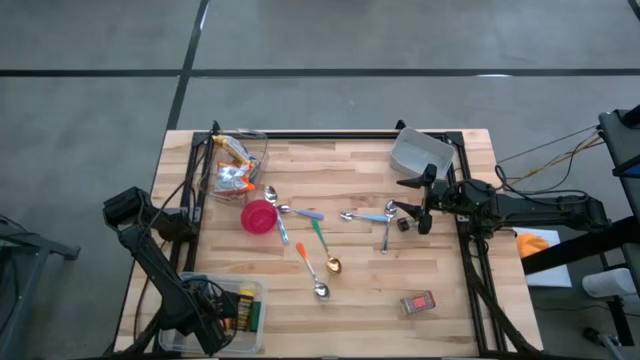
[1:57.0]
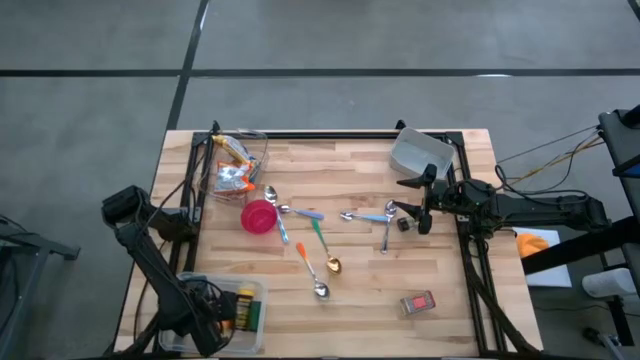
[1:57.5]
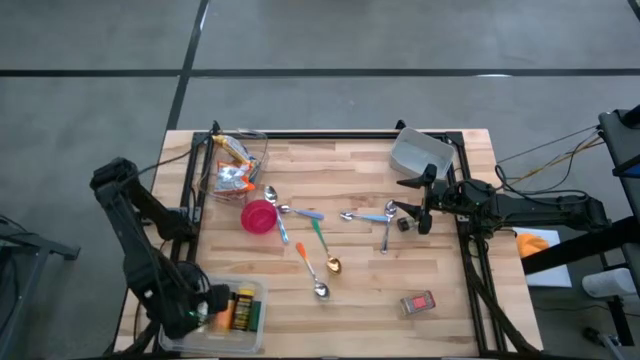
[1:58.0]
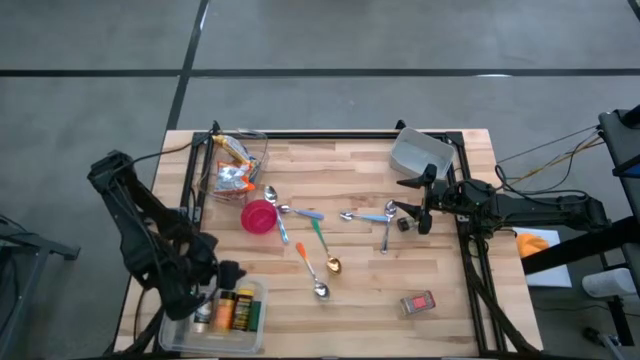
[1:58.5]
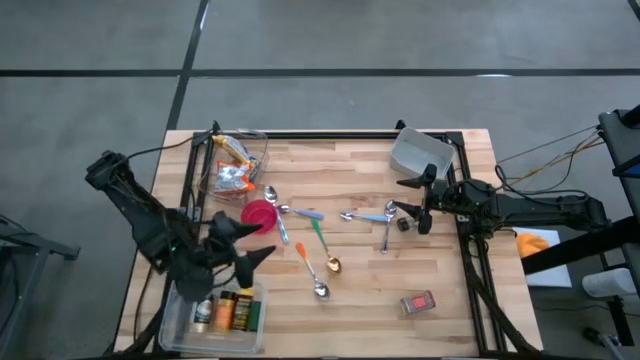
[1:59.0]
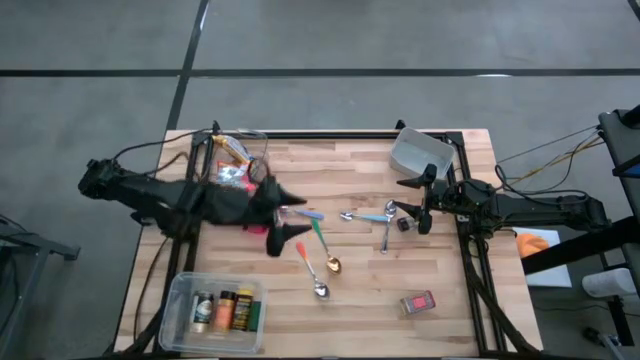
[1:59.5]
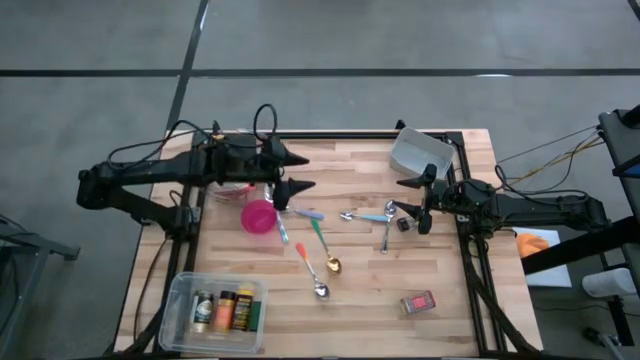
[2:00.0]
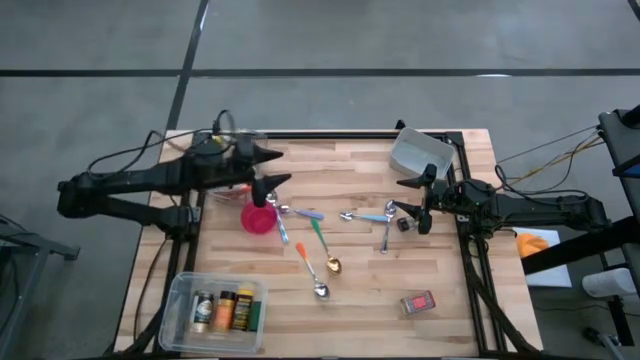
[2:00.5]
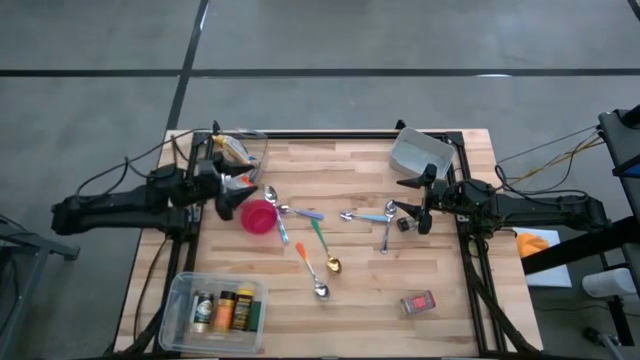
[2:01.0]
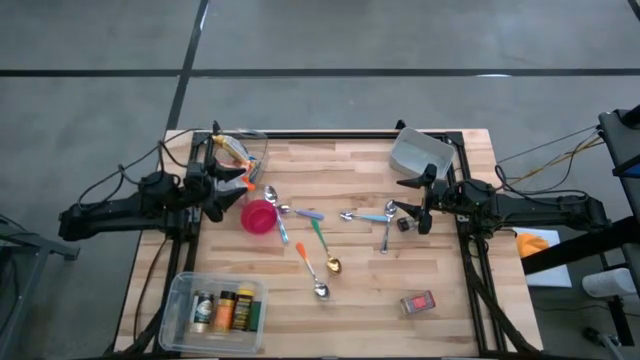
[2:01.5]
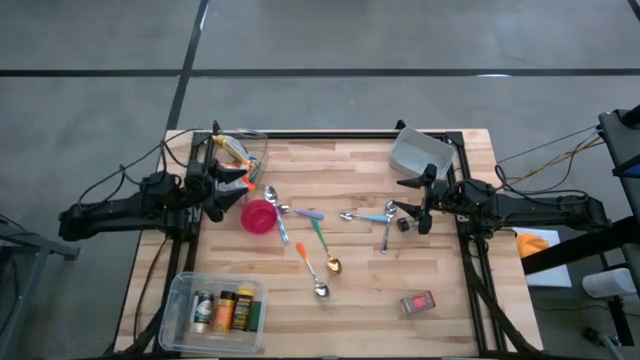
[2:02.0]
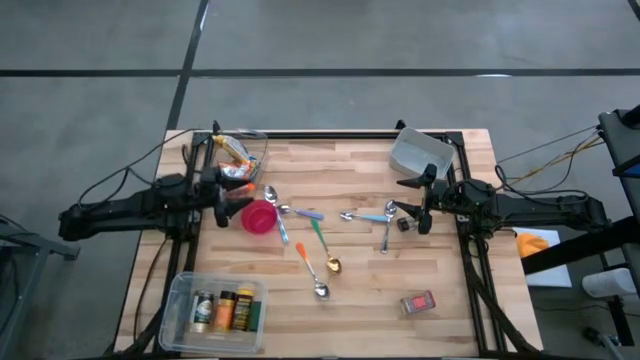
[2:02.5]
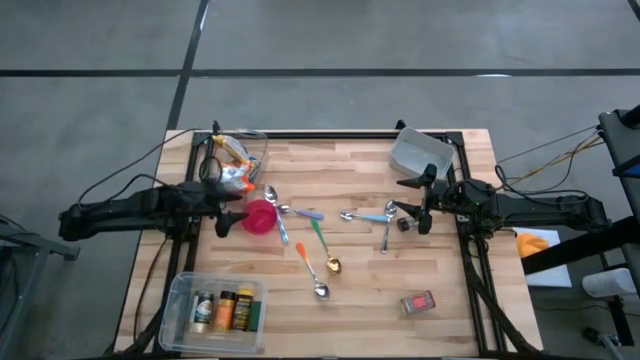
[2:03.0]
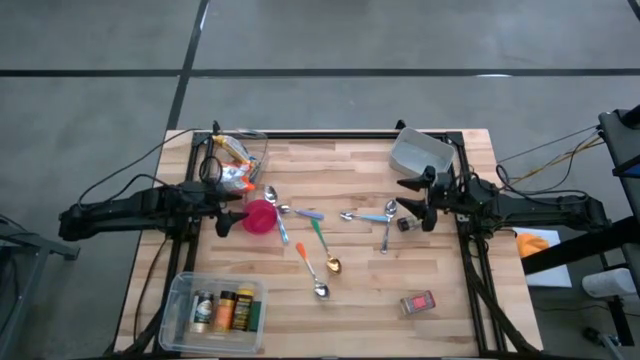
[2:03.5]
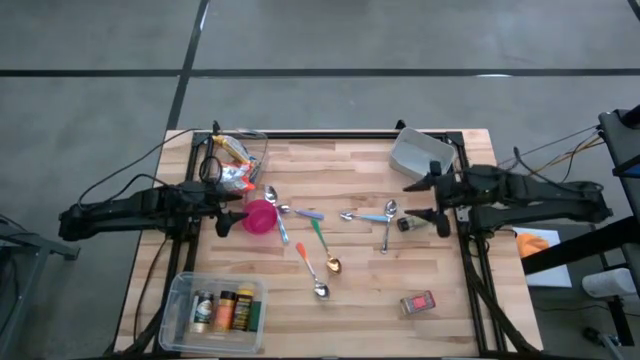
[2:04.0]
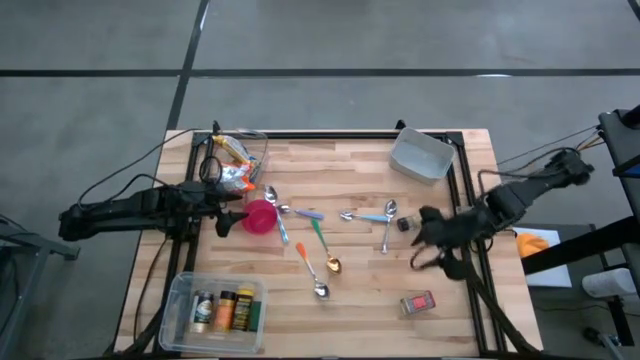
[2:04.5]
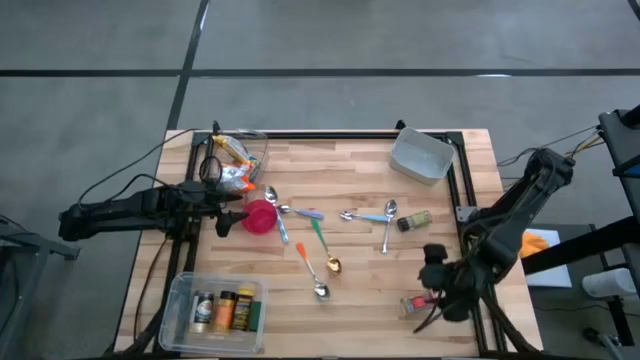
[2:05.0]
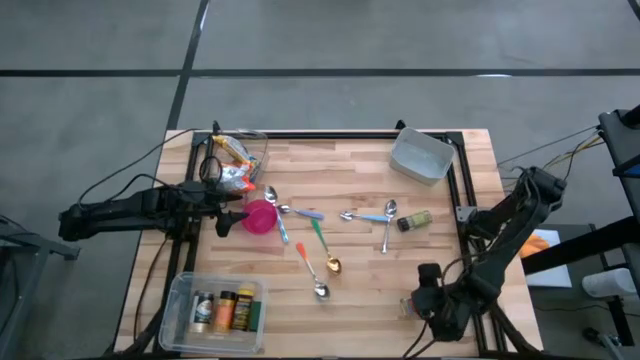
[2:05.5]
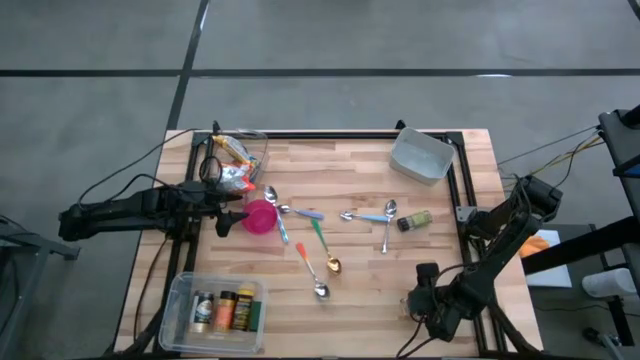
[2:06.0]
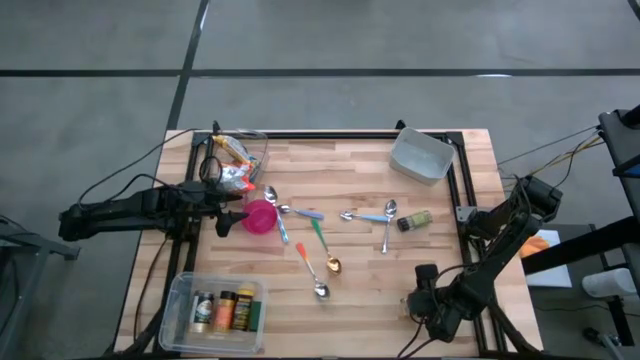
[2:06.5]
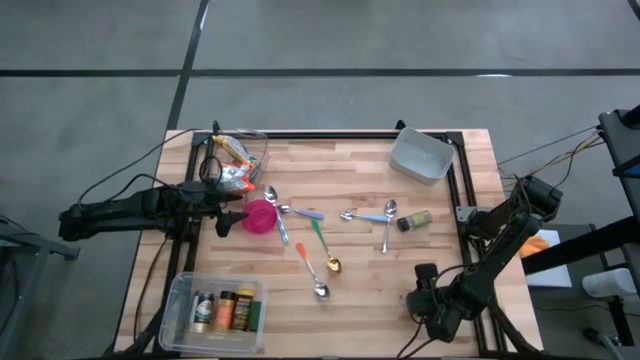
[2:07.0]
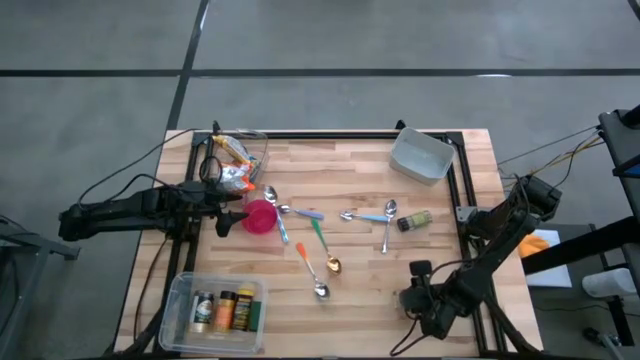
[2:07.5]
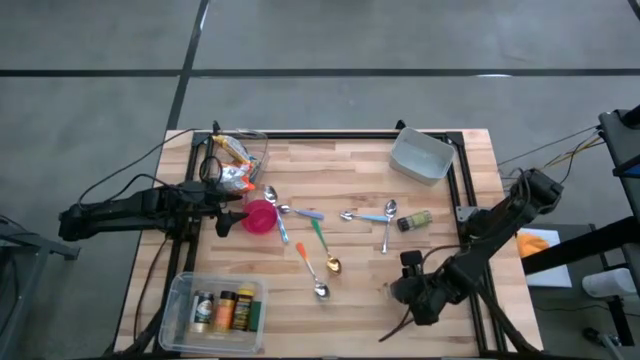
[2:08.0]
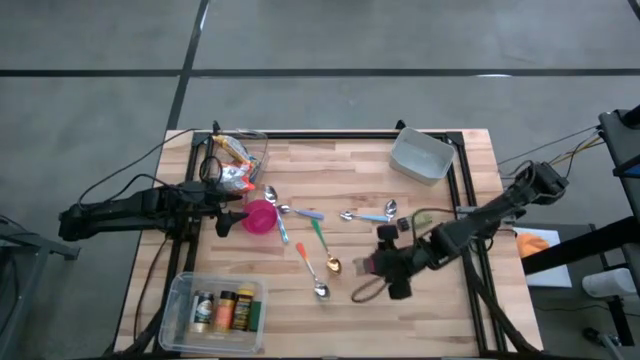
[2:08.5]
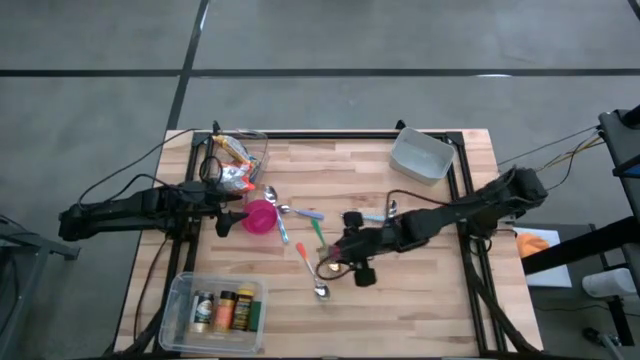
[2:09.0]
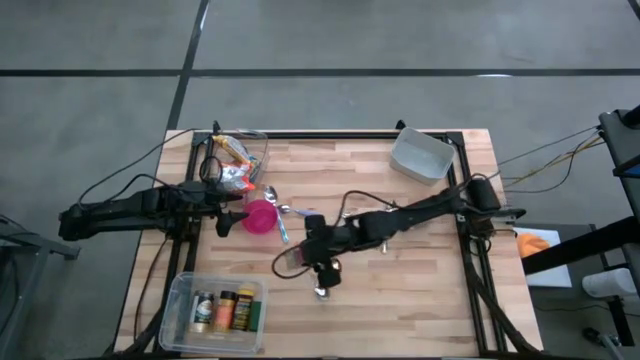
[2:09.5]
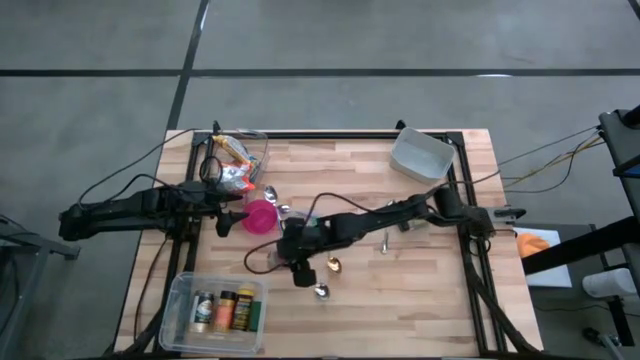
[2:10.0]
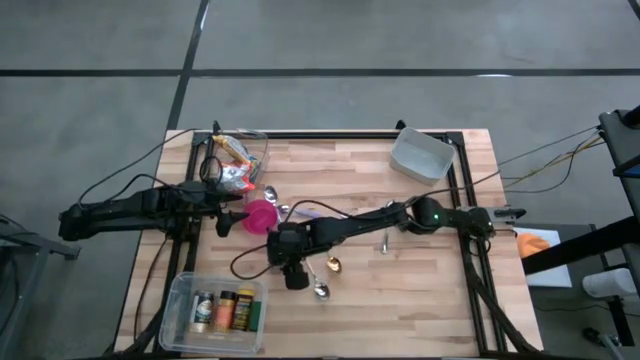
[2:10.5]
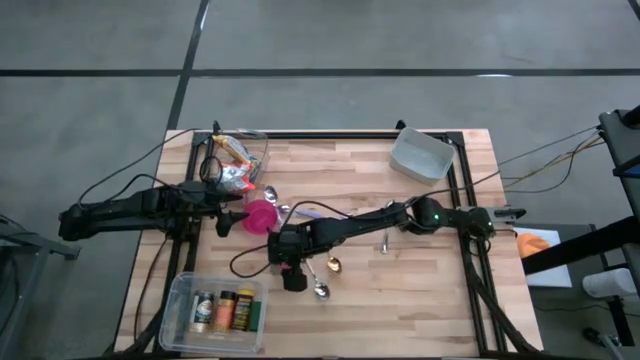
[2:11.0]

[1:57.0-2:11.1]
Put the red seasoning can into the white bin
